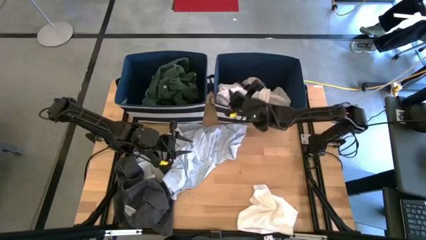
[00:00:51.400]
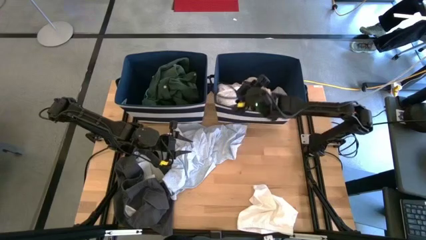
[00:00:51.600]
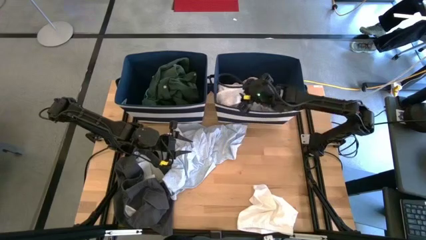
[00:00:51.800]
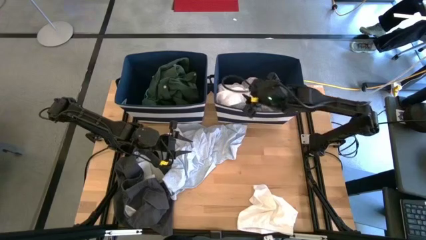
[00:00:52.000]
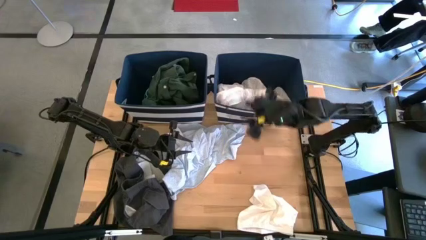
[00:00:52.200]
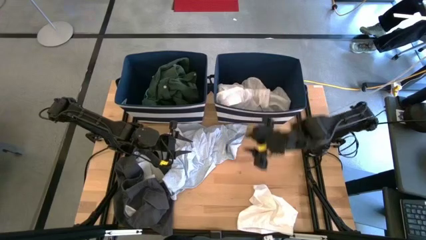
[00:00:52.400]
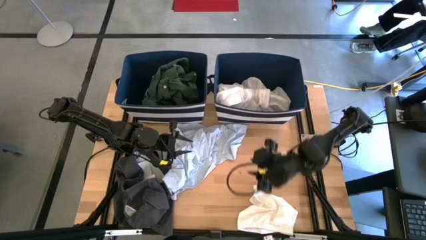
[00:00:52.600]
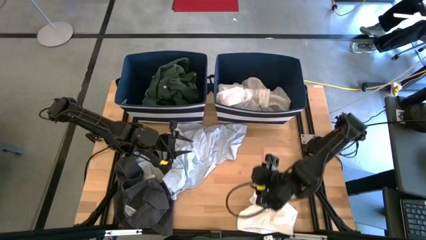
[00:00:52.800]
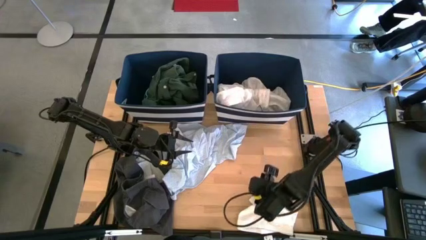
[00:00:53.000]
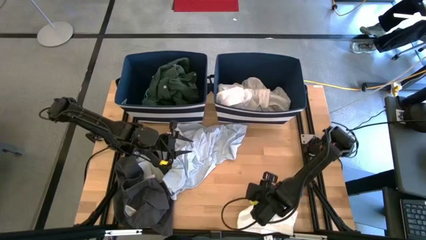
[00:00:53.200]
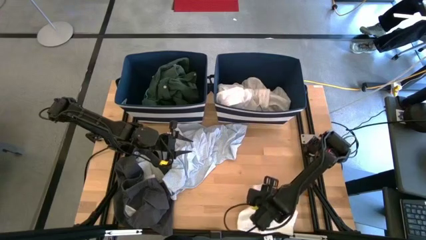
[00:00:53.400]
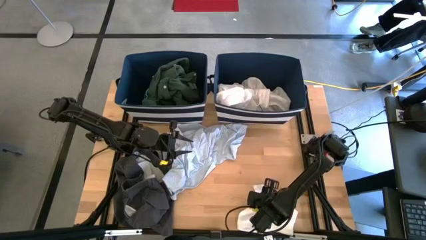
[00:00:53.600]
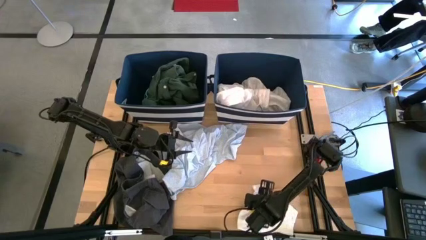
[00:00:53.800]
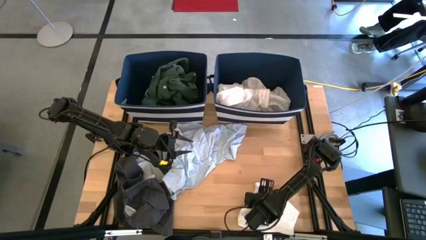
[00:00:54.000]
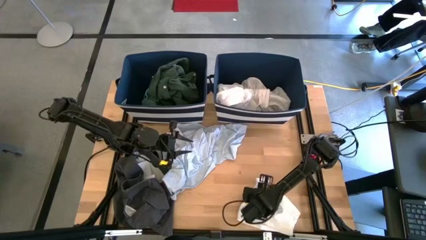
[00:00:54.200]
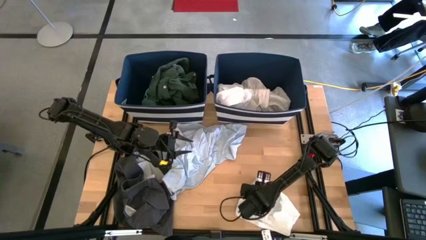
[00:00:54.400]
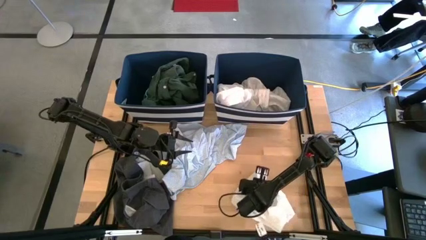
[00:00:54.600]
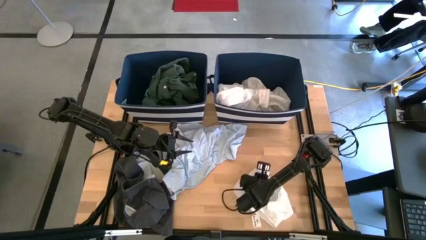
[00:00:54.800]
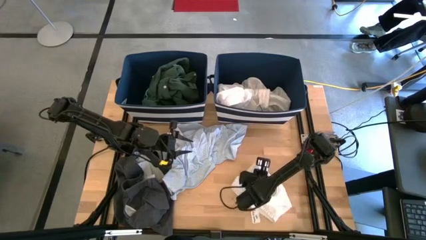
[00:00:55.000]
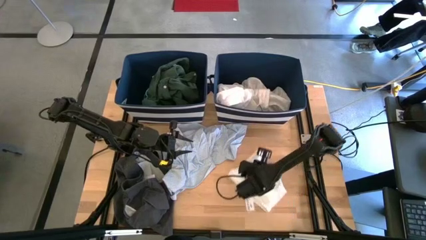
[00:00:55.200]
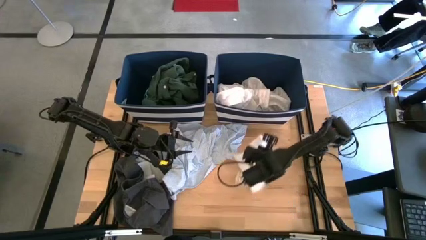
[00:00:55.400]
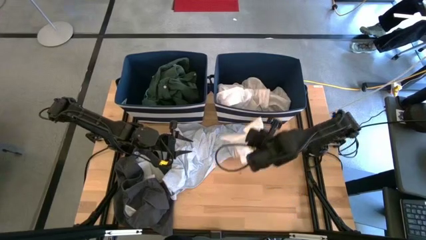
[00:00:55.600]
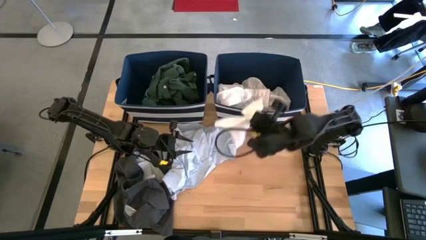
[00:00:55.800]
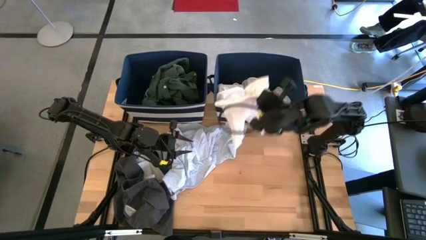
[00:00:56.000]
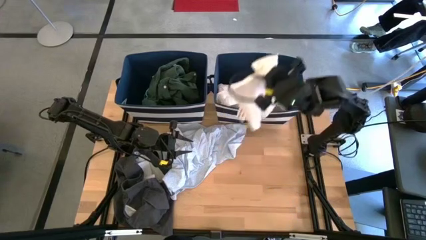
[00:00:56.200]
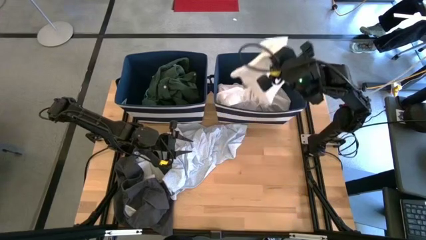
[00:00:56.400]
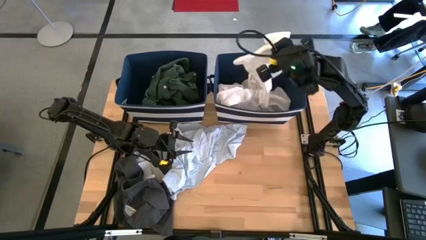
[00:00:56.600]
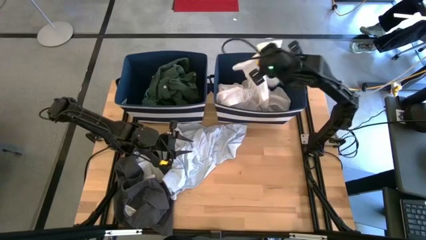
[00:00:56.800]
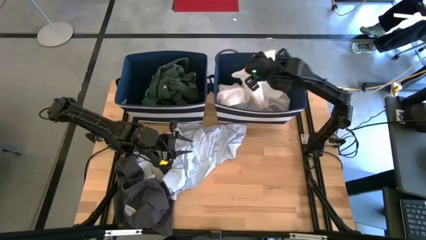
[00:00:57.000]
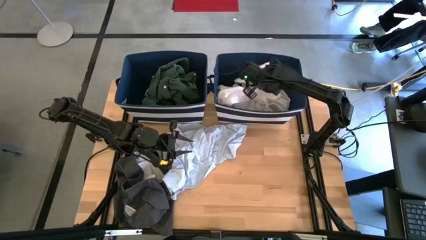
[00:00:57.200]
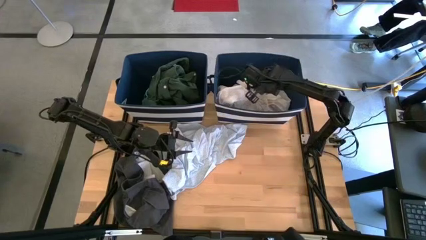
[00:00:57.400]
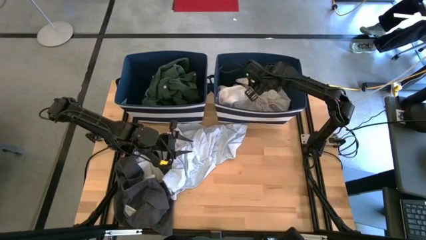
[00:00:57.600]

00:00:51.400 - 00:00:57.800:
Task: Sort clothes
Put the white shorts into the right laundry bin

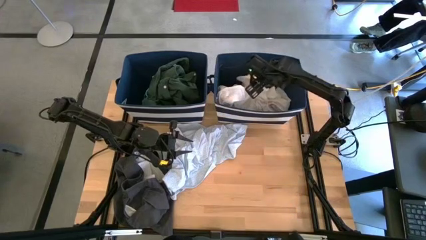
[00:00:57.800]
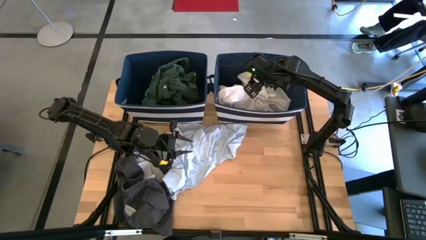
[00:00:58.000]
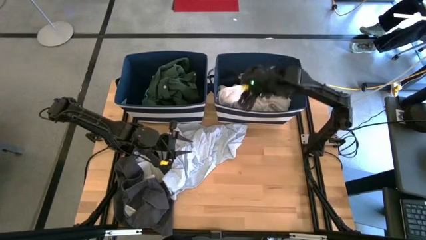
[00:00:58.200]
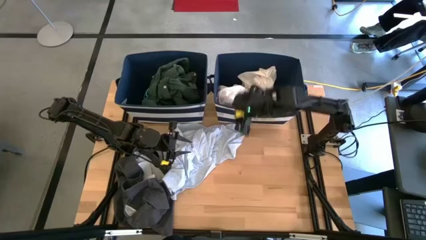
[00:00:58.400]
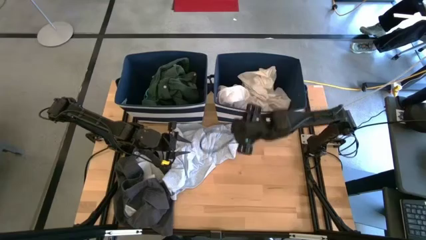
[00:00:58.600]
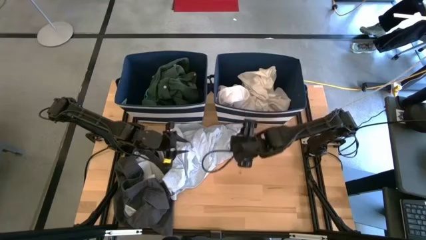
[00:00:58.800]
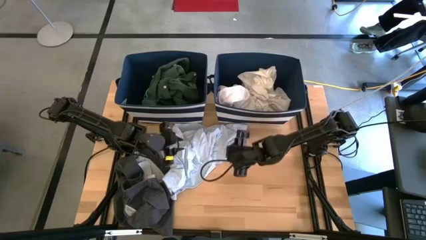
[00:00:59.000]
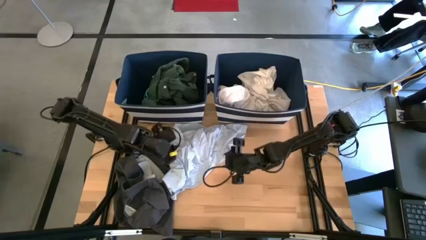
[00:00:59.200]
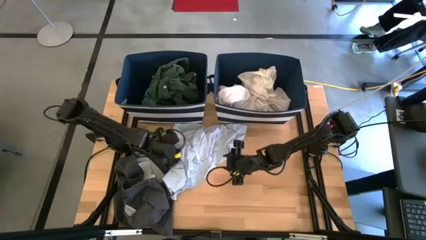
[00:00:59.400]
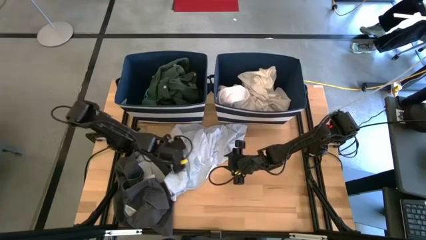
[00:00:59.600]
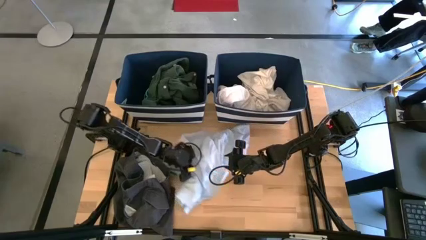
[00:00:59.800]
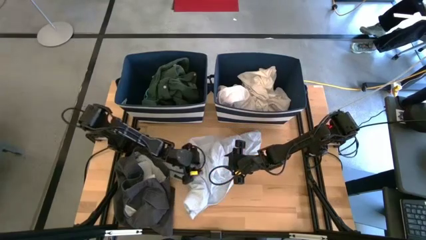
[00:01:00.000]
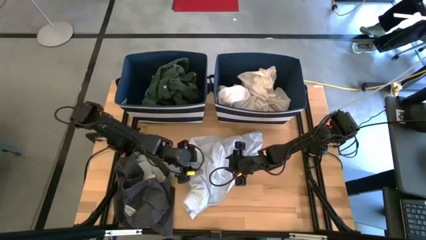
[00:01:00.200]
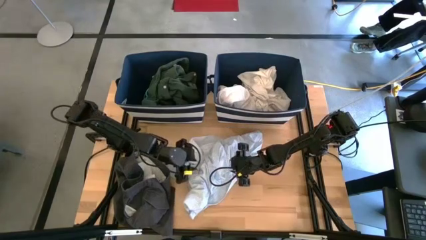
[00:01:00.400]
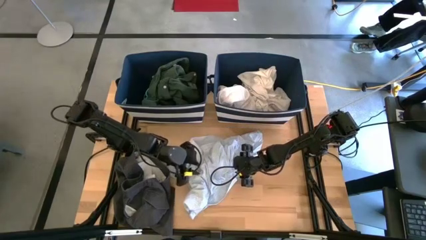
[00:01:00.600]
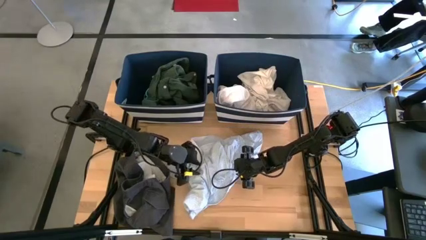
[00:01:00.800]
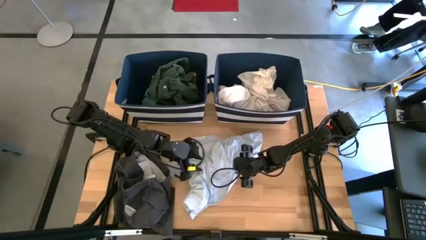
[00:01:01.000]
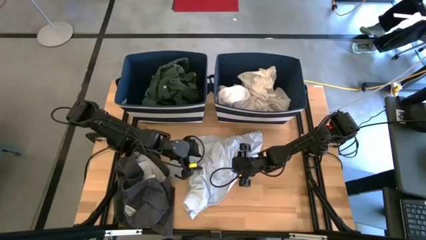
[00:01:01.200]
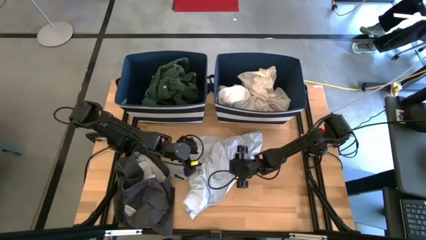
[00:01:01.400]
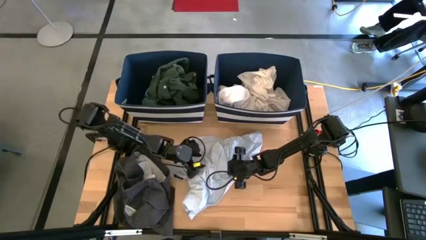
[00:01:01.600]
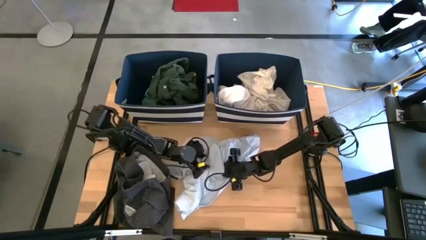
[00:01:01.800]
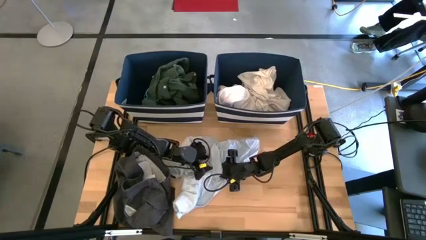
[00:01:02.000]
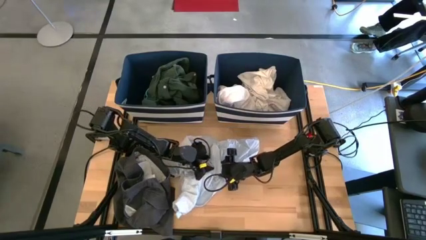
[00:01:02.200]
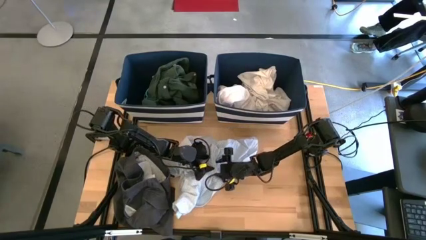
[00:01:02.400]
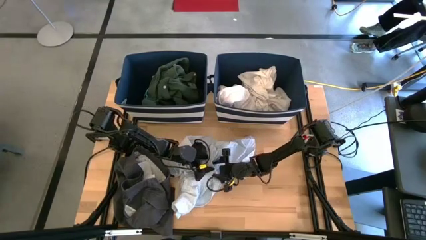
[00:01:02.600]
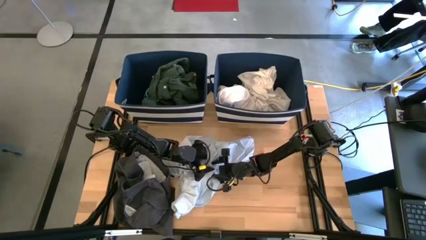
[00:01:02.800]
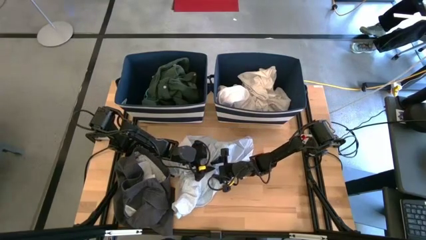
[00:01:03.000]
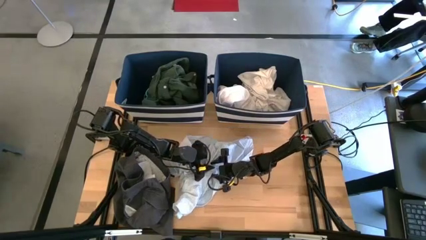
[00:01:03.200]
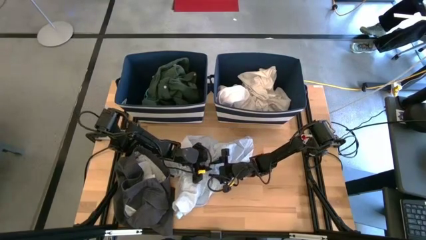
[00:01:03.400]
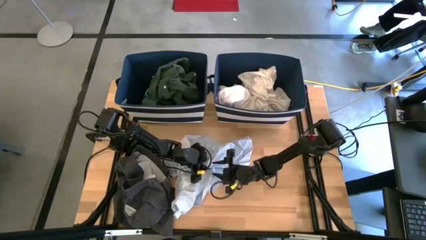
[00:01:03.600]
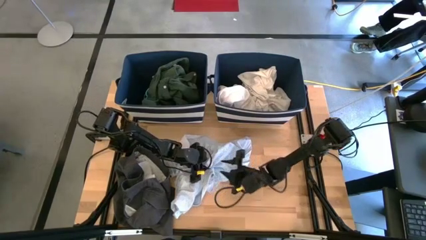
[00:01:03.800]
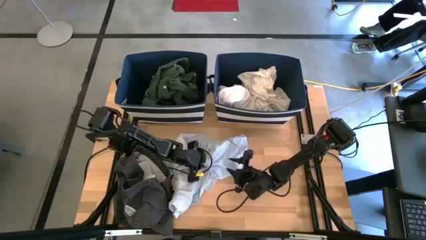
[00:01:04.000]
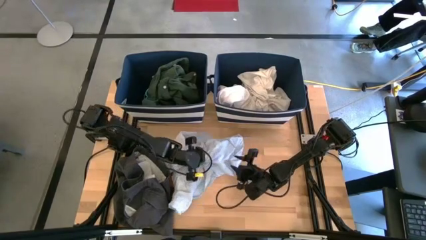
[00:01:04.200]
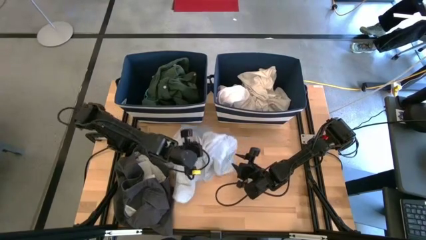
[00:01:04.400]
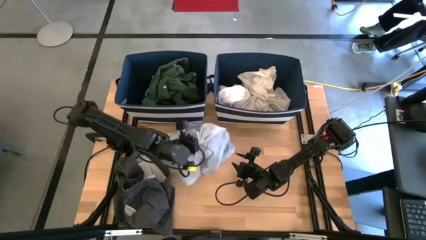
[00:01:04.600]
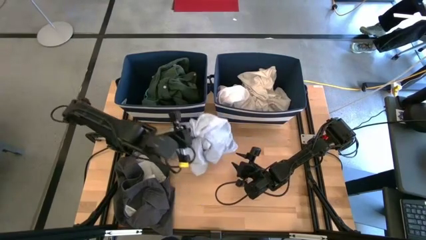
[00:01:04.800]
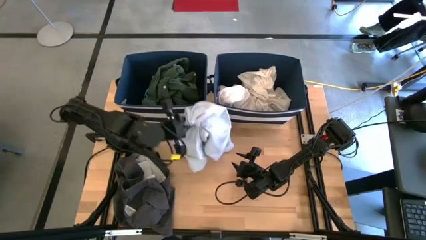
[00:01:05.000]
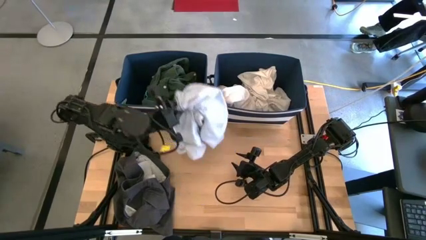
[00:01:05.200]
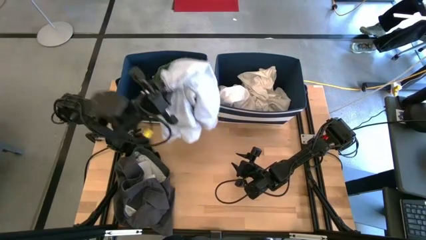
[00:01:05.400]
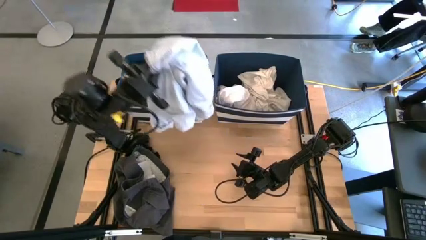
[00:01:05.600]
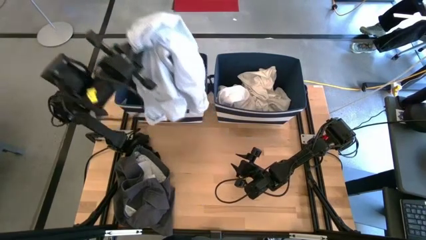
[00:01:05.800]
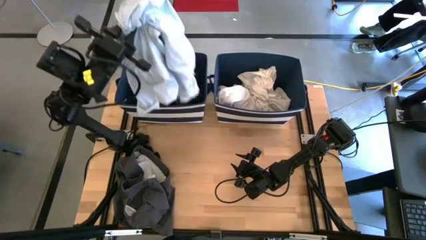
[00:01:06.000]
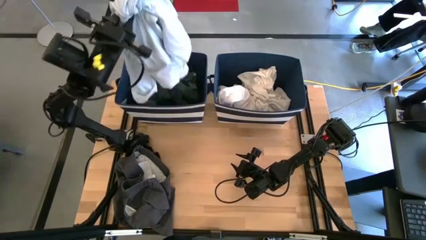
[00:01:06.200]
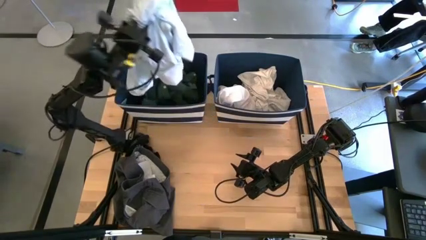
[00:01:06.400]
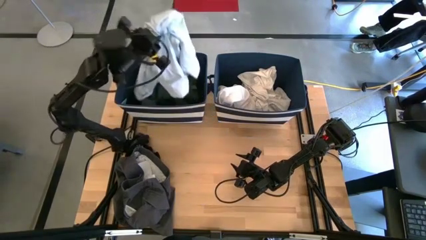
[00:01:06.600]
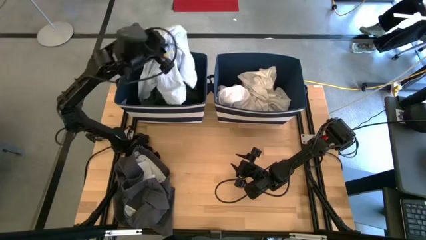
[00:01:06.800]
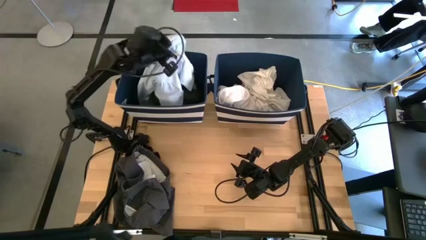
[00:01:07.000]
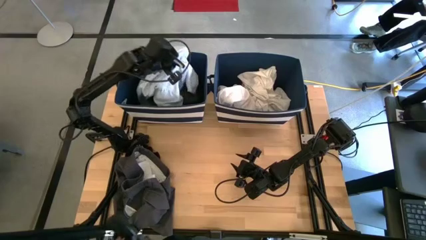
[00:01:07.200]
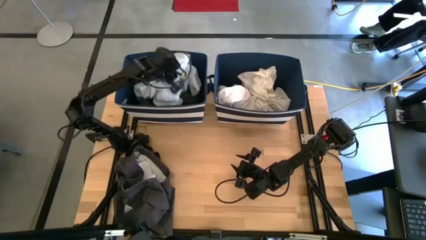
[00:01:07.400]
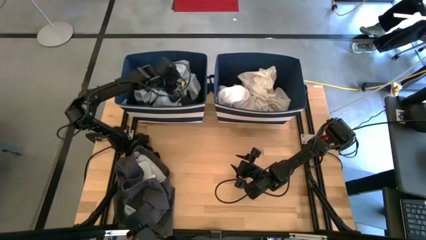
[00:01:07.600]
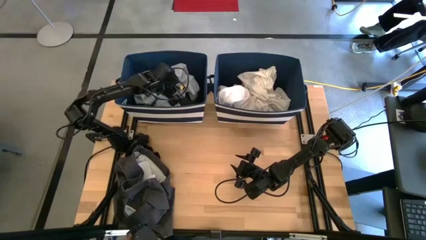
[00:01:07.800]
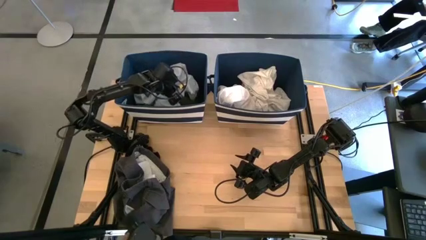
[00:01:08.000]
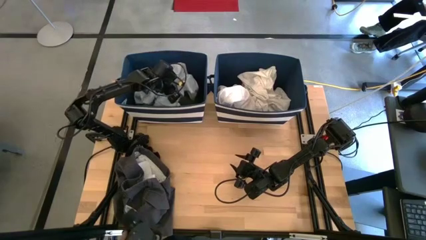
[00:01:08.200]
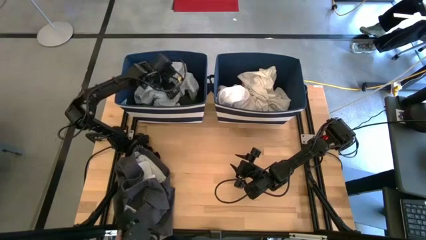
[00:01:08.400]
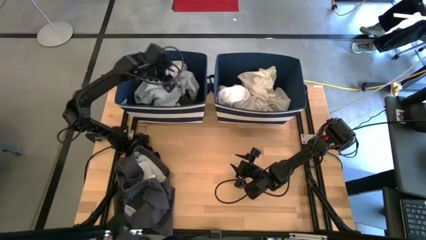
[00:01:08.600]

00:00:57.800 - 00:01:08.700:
Put the white-blue patterned patient gown into the left laundry bin
